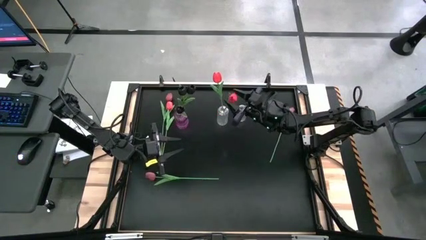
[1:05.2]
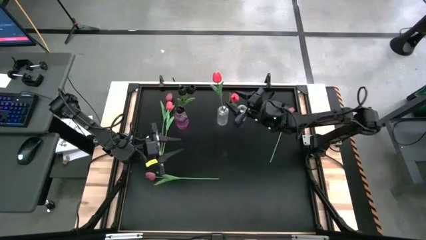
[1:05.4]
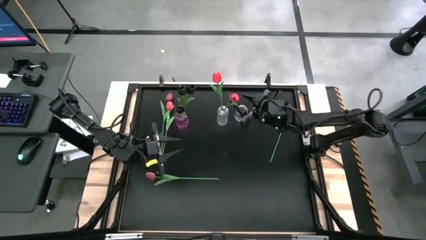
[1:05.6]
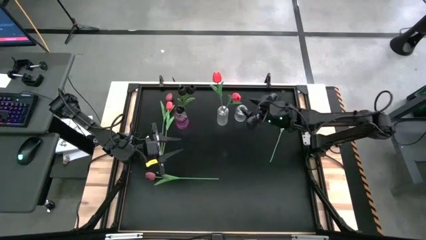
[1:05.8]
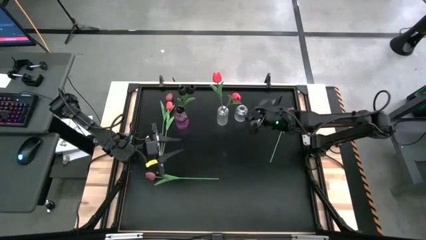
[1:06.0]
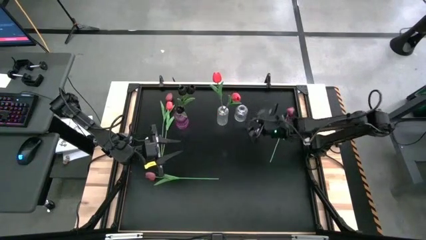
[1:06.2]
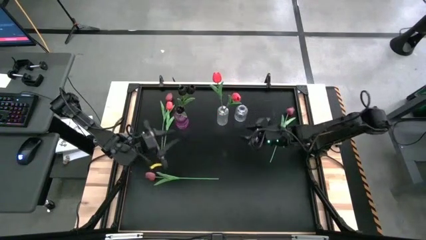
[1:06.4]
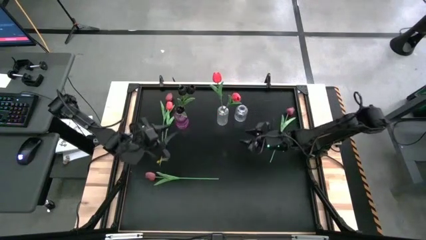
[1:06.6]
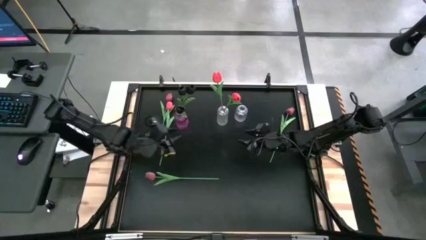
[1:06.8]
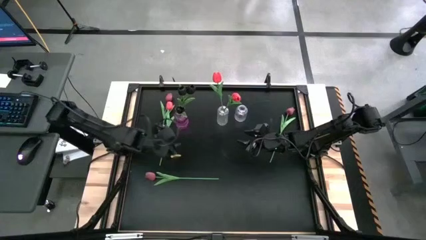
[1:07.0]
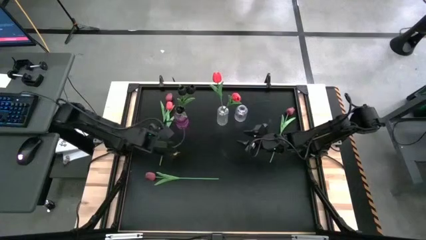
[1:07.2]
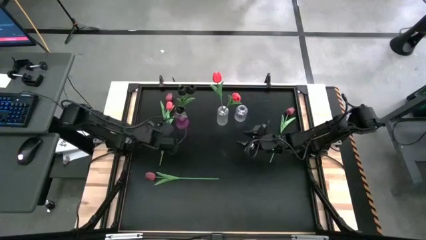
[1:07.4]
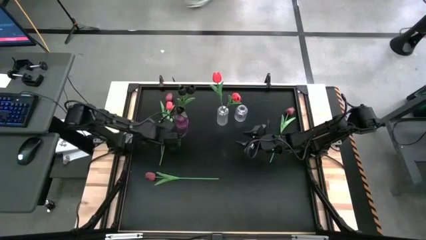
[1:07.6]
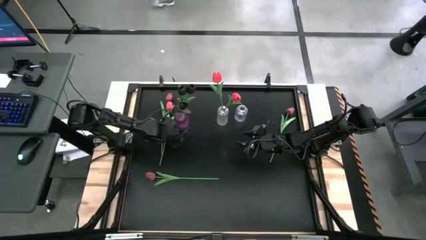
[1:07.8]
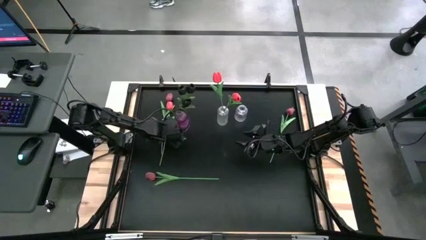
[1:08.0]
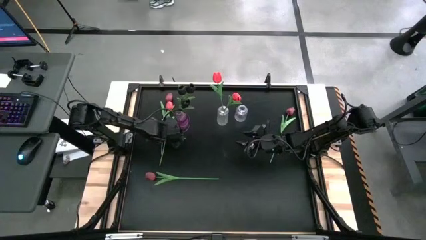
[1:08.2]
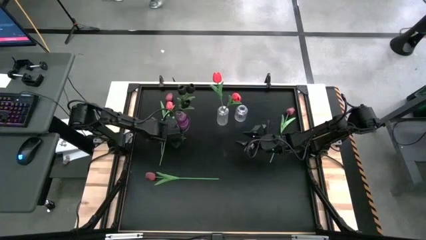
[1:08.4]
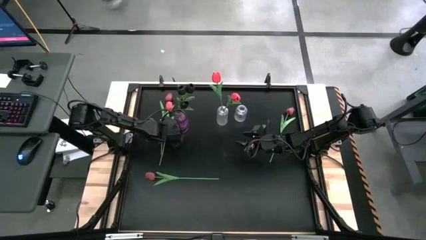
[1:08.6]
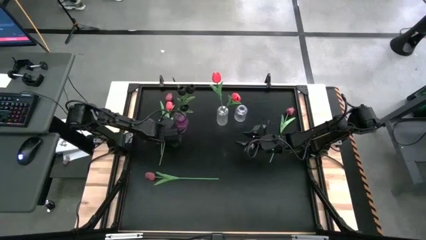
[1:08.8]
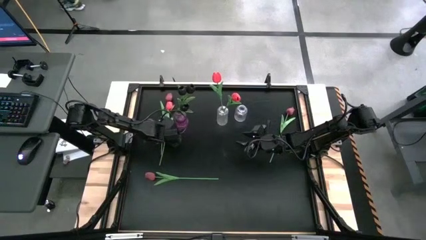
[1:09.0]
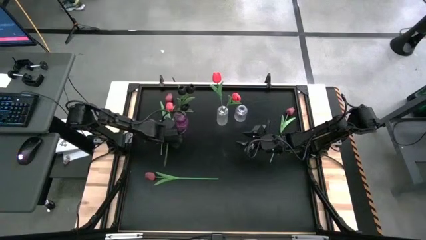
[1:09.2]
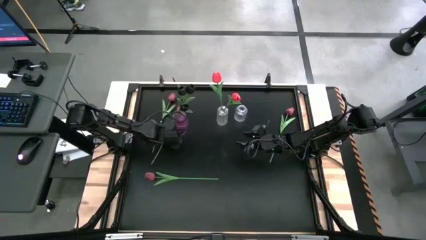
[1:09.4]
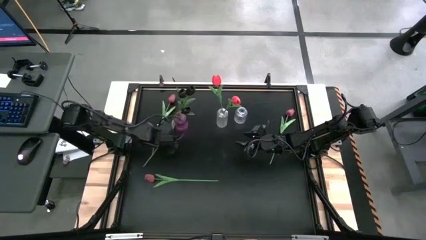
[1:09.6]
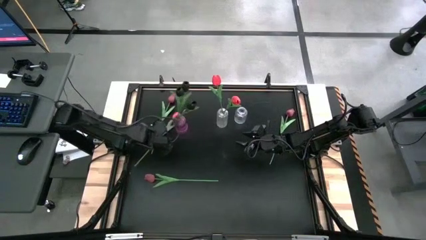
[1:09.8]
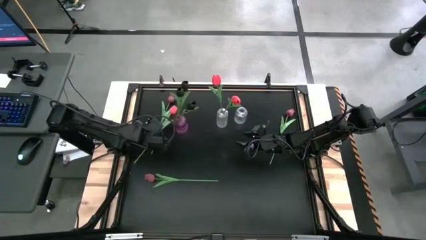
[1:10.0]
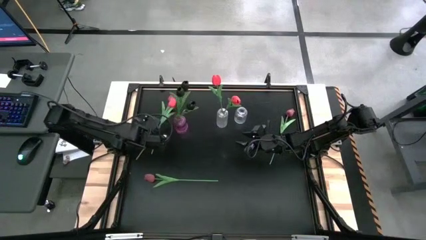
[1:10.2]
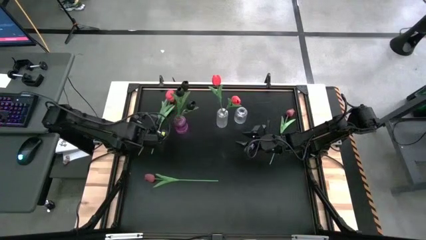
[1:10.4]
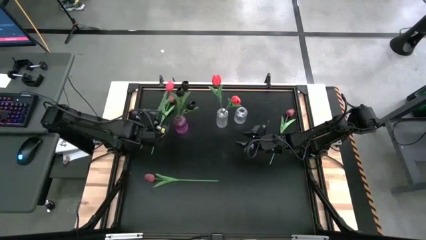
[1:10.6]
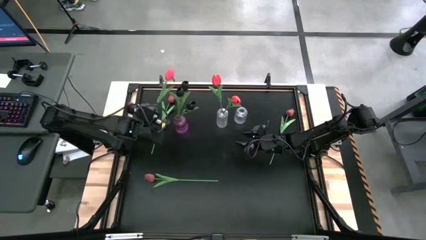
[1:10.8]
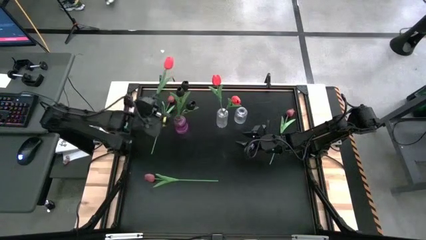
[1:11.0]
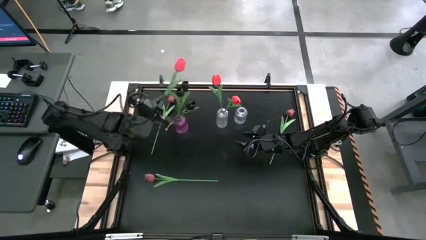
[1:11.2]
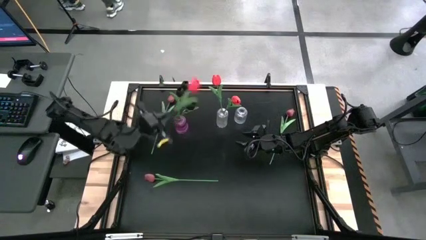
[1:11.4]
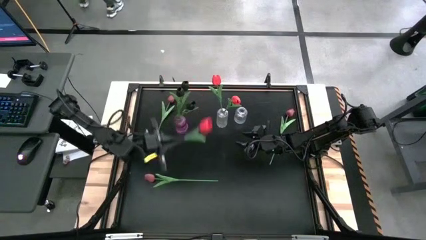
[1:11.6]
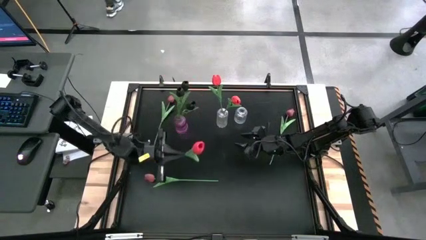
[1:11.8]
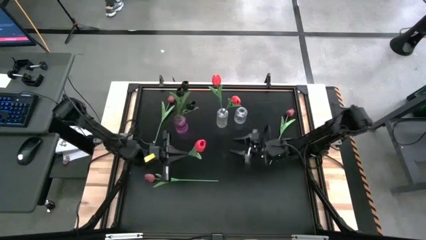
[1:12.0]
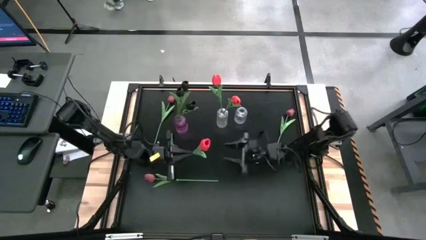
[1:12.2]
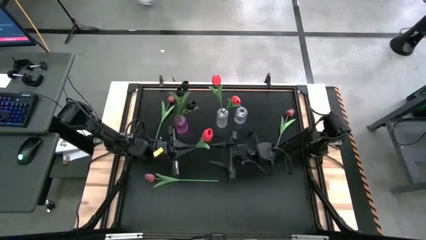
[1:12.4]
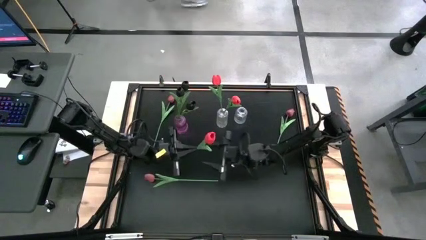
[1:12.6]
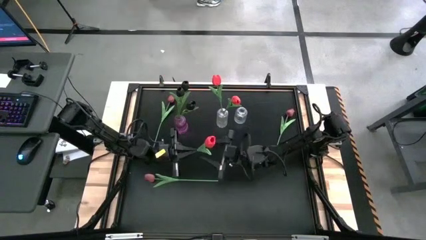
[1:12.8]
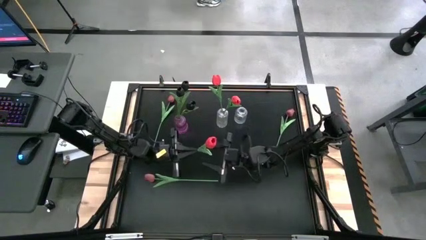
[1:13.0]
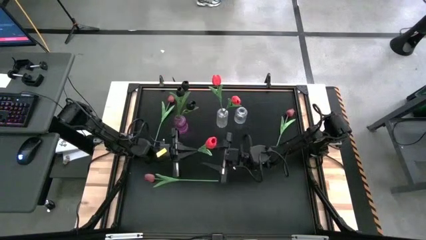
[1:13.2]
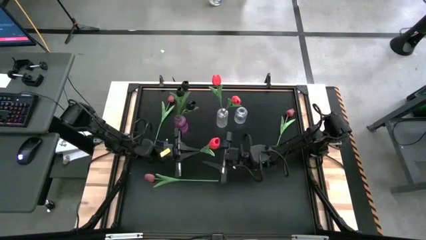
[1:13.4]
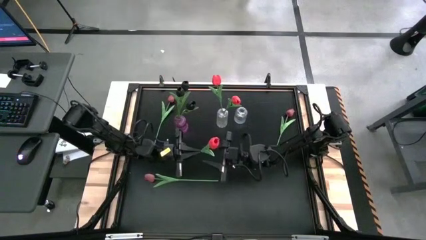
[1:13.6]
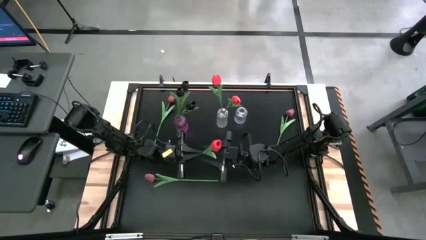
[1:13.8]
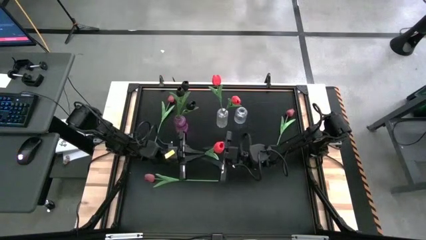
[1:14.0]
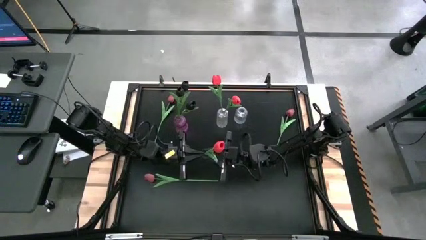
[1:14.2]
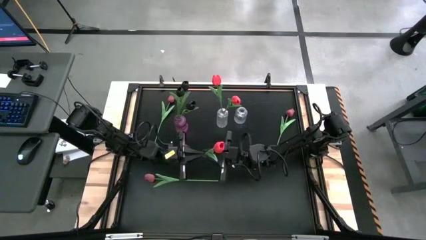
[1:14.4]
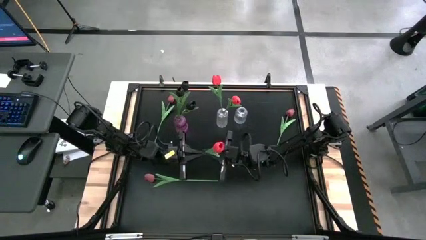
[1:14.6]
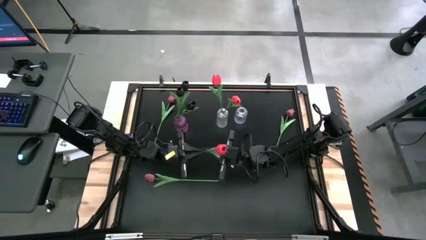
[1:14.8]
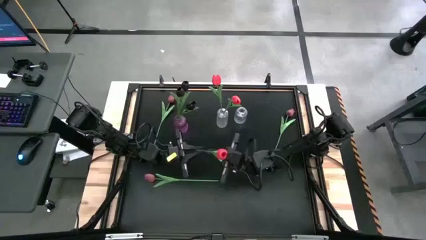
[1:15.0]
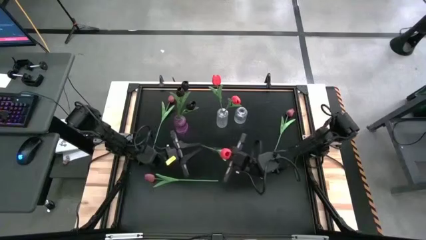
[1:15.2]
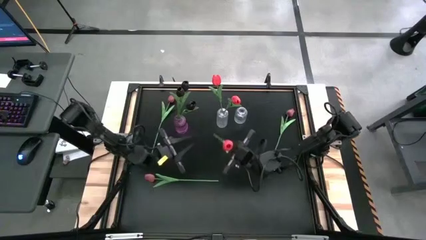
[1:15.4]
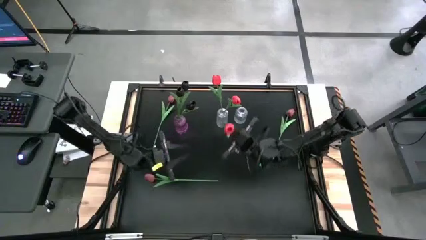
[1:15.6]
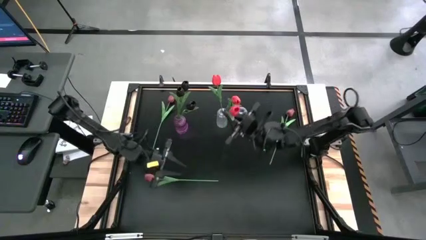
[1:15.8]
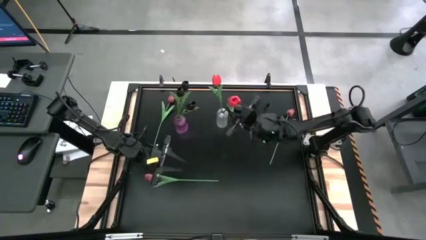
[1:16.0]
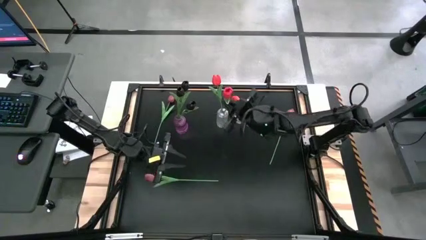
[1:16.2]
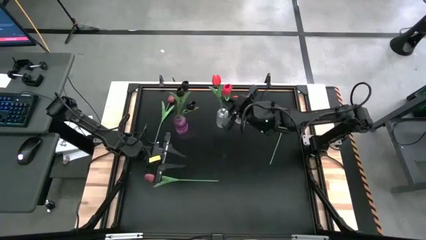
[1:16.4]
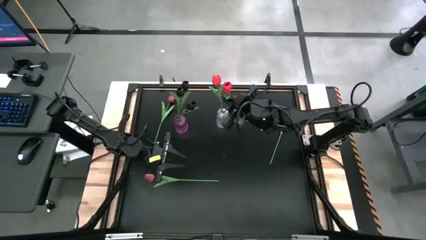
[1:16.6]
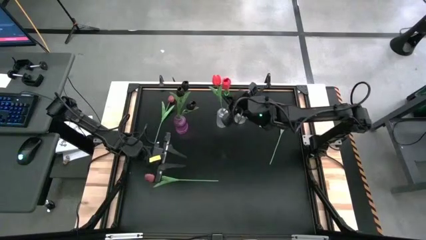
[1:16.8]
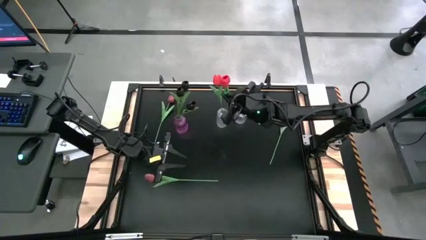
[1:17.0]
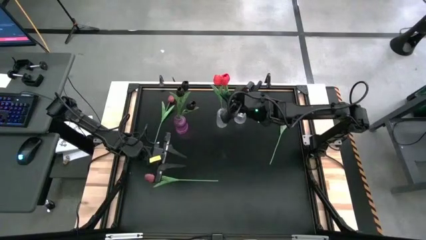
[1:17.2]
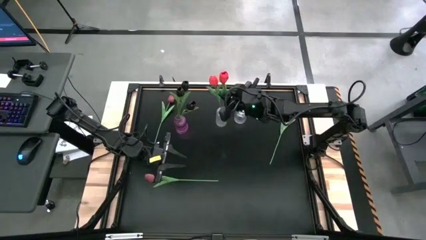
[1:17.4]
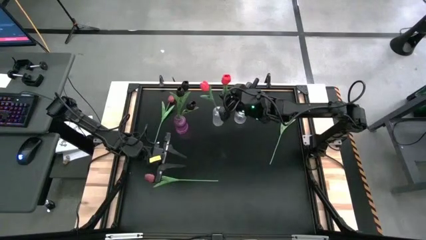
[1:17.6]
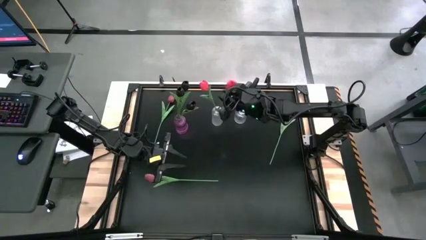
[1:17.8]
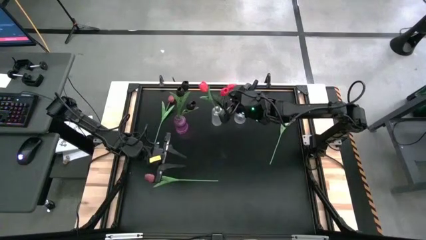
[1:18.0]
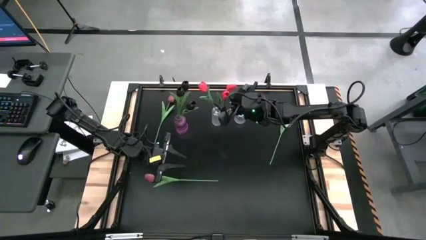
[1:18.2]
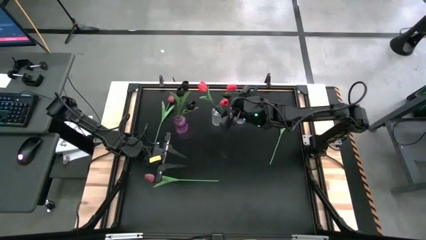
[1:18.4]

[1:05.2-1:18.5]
Task: Sort flowers into vase by color
Put the pink flower into the left transparent vase

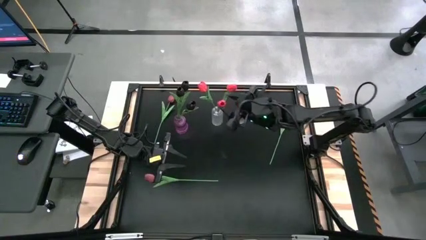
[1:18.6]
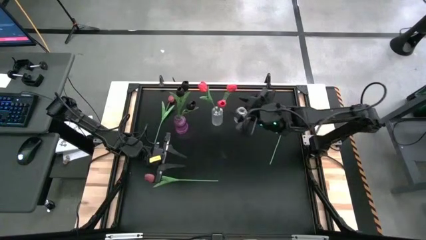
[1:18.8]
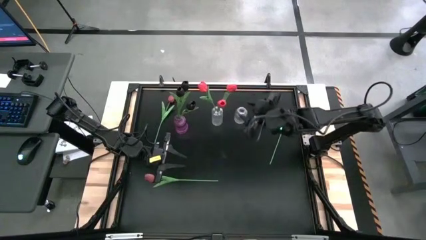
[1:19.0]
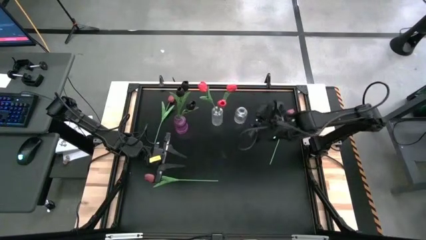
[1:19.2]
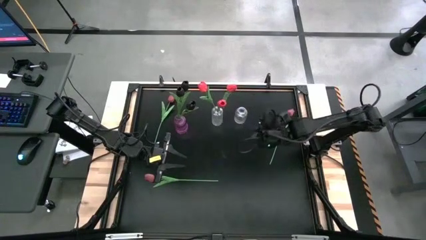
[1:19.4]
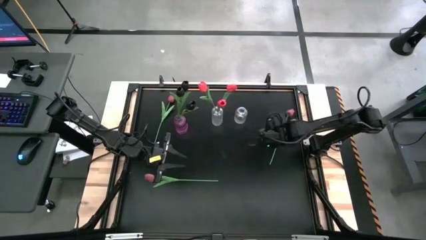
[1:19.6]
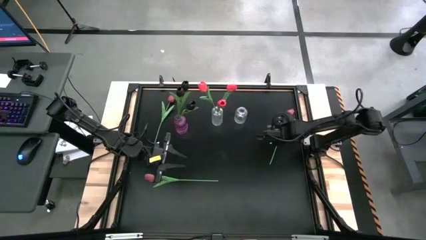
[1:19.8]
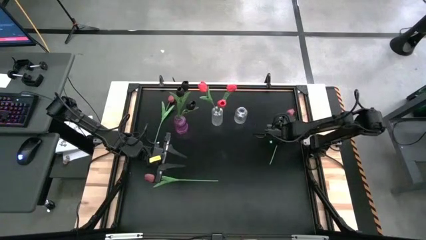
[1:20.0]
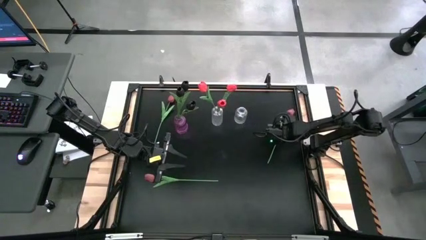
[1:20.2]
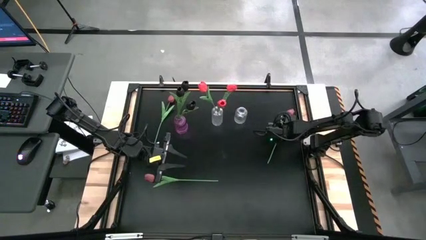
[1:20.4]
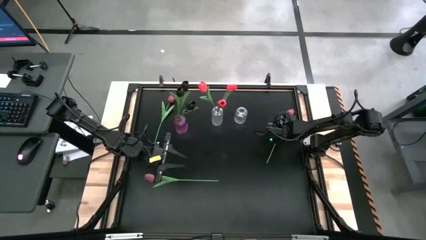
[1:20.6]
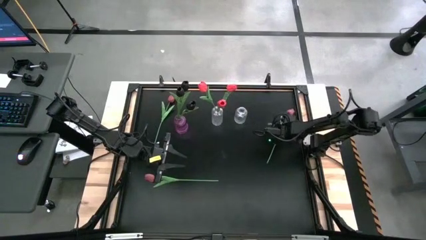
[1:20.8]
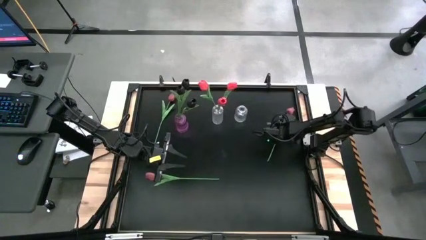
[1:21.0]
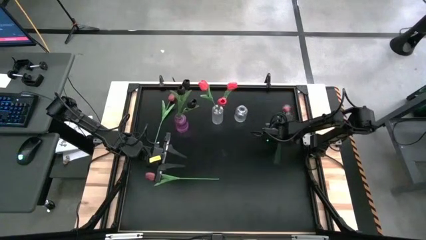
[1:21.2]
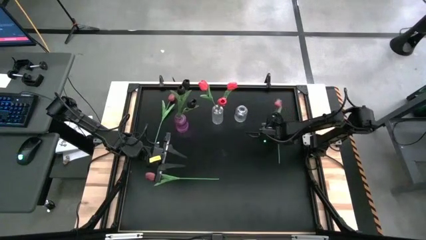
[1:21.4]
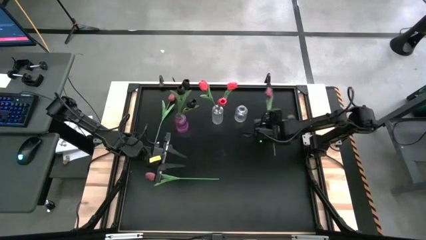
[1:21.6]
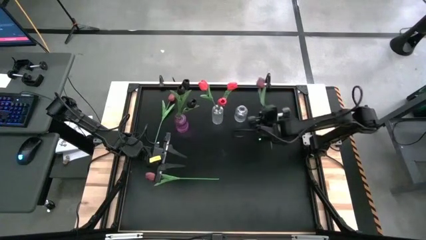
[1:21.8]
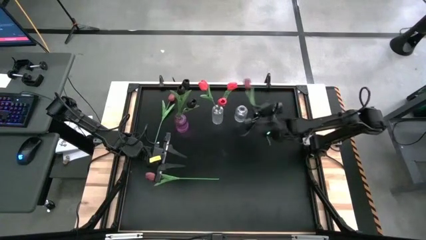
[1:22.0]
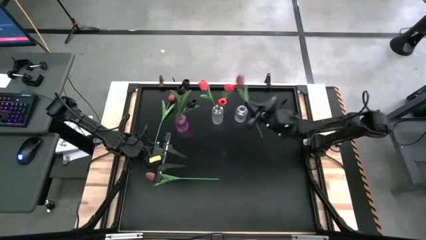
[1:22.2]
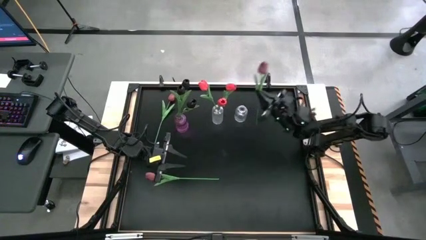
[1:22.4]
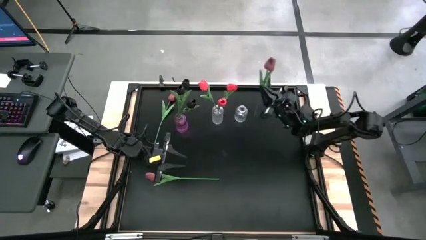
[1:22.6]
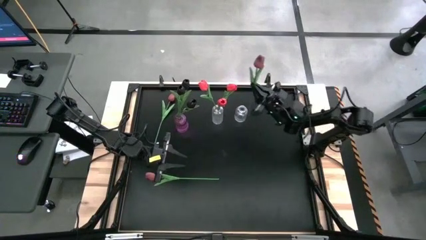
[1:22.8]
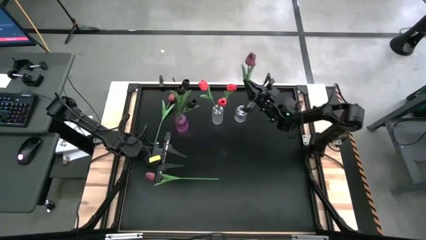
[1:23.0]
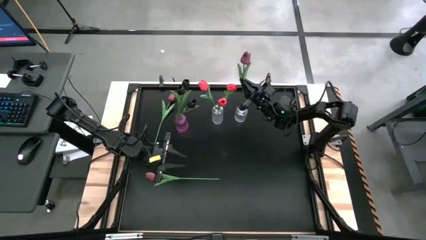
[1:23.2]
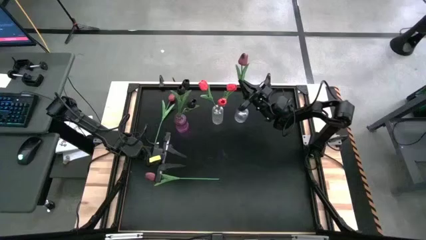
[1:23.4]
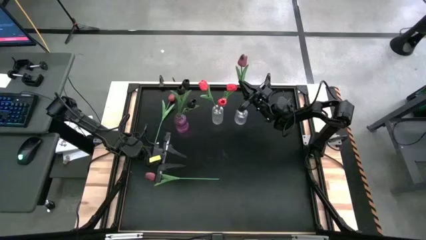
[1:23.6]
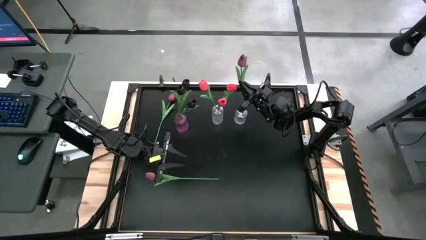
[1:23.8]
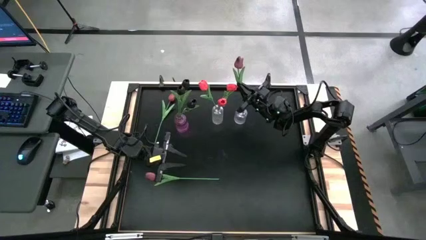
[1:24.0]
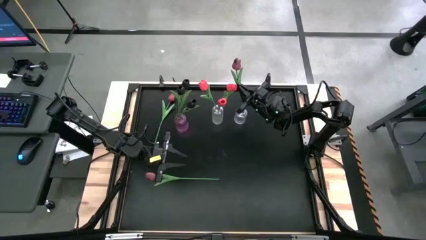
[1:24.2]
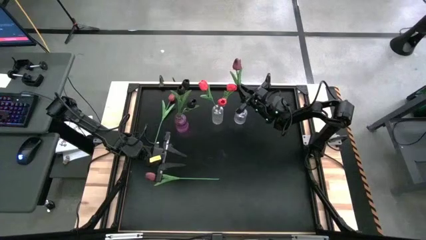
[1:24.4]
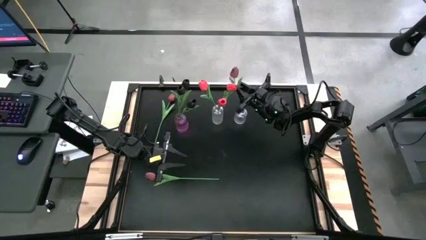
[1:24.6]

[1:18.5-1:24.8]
Put the top right dark red flower into the right transparent vase
